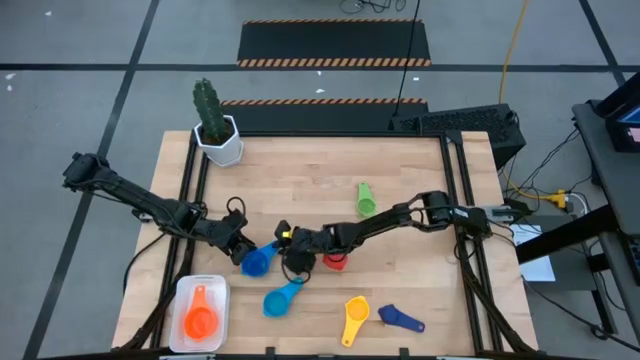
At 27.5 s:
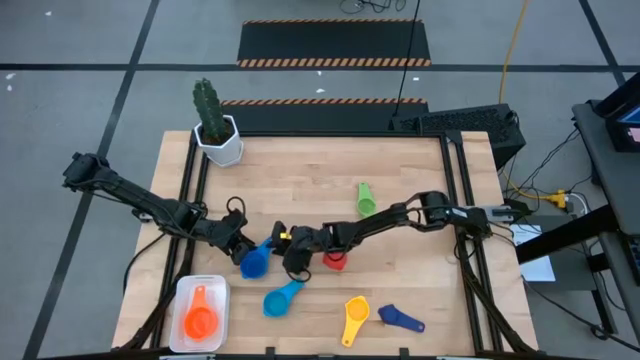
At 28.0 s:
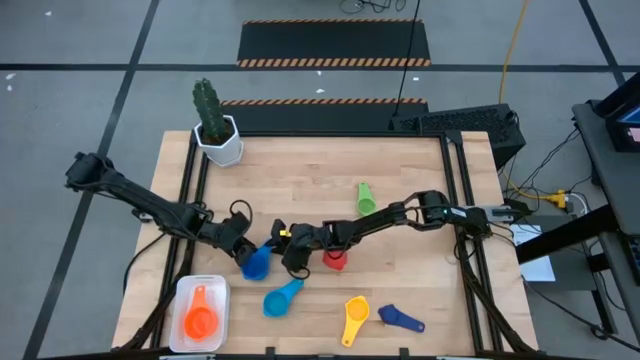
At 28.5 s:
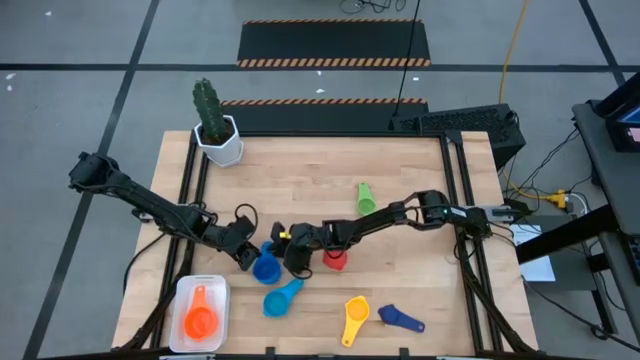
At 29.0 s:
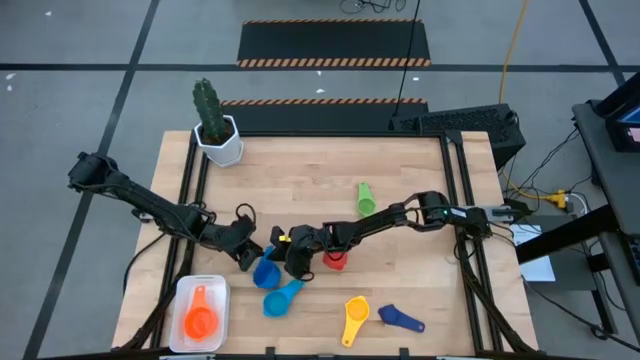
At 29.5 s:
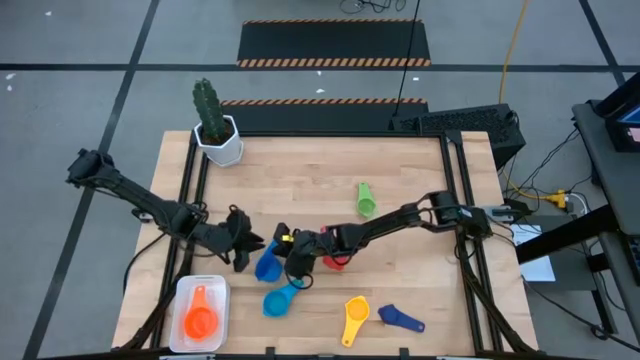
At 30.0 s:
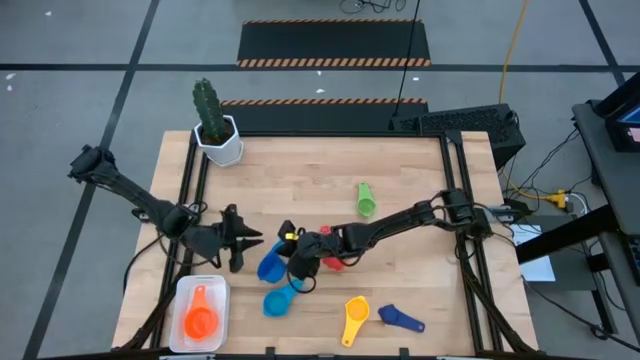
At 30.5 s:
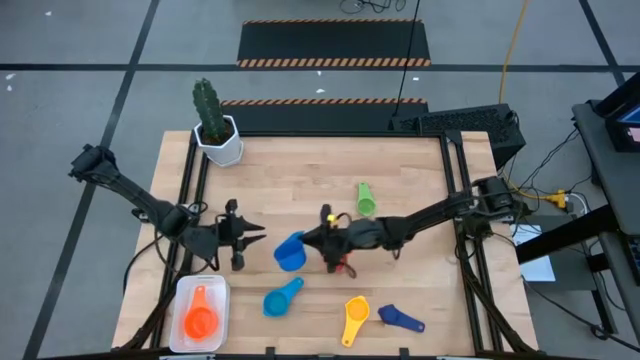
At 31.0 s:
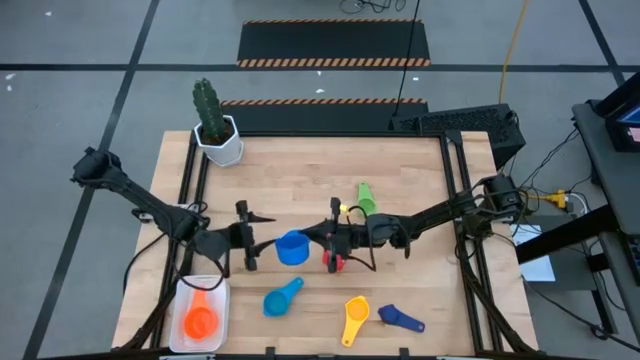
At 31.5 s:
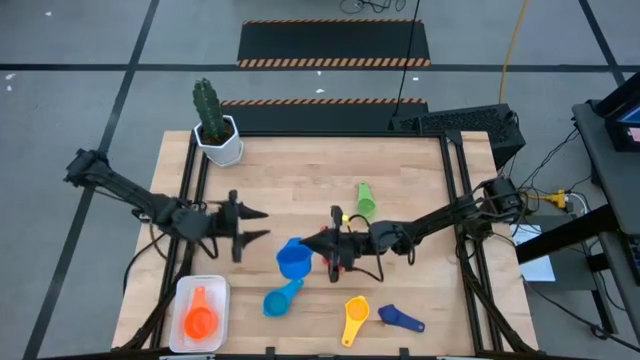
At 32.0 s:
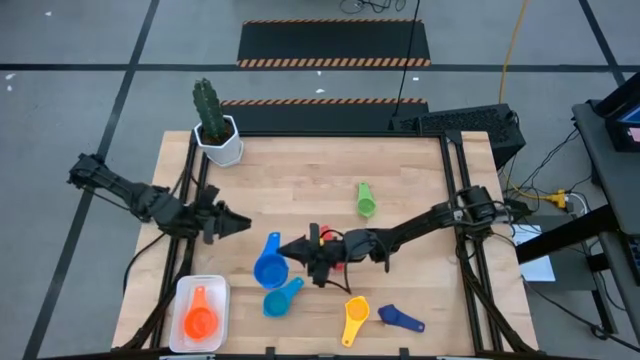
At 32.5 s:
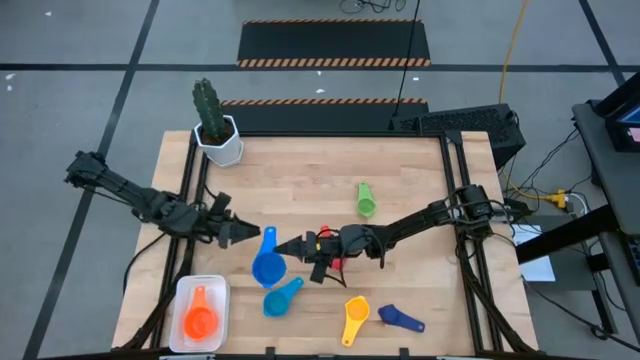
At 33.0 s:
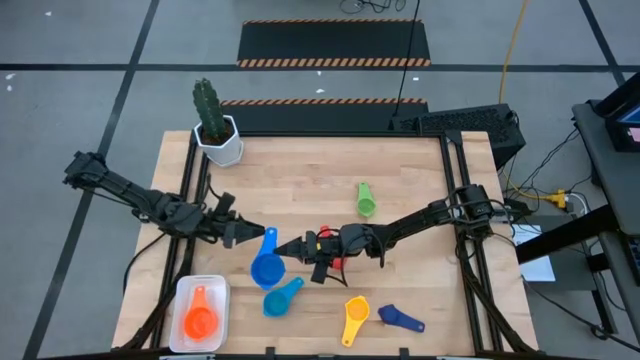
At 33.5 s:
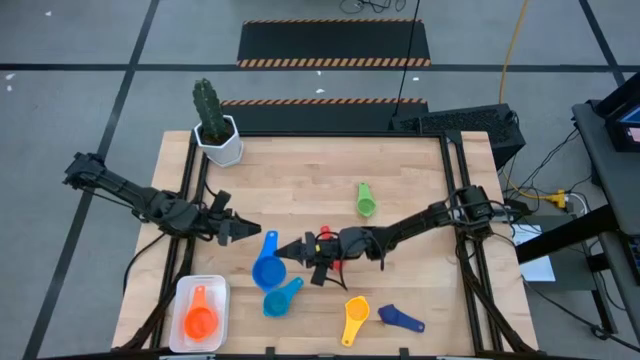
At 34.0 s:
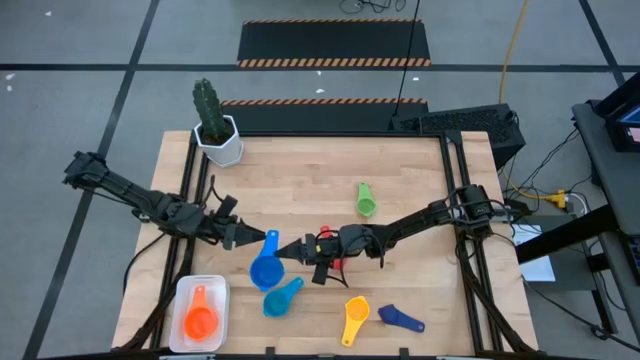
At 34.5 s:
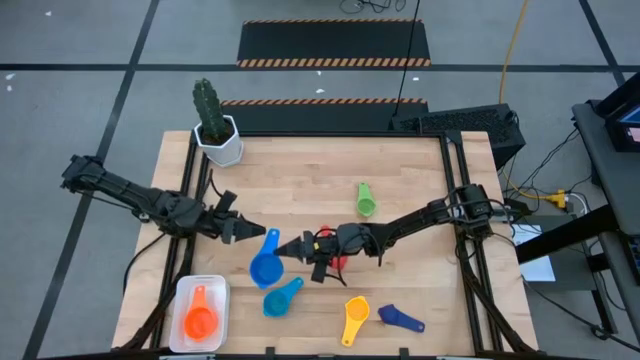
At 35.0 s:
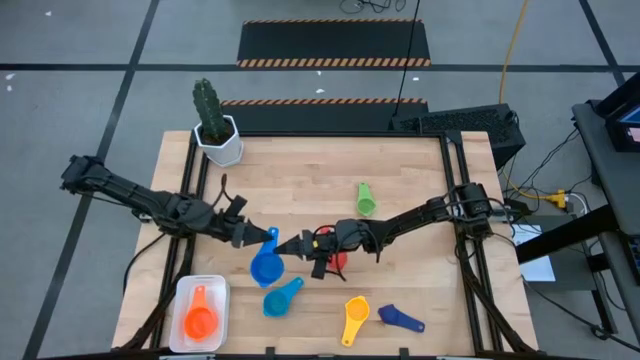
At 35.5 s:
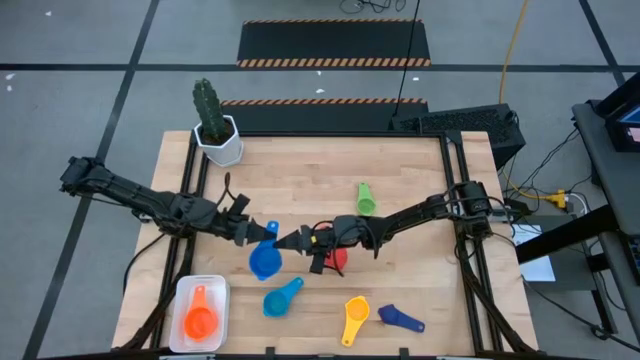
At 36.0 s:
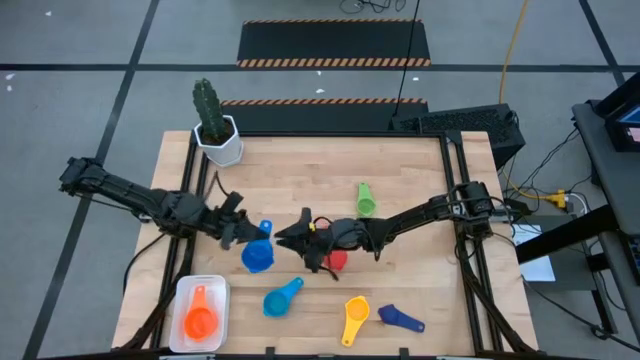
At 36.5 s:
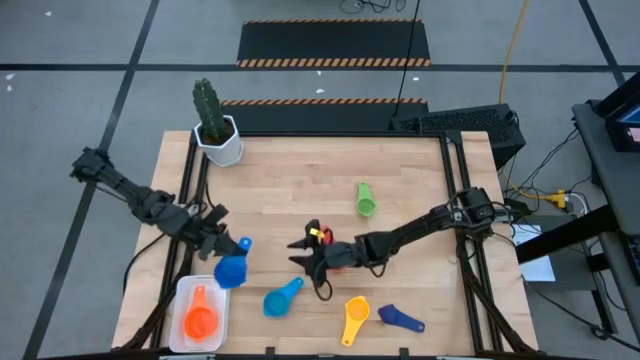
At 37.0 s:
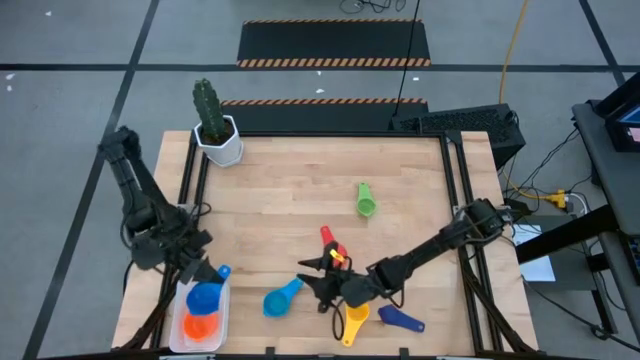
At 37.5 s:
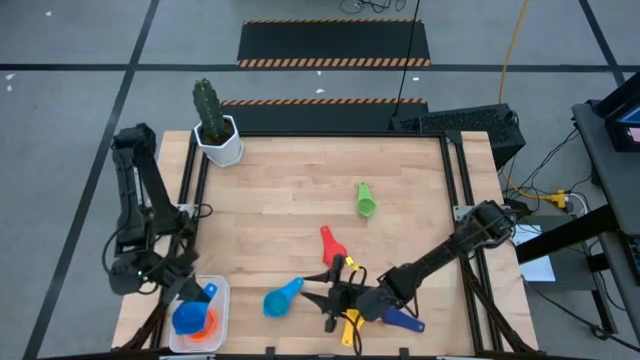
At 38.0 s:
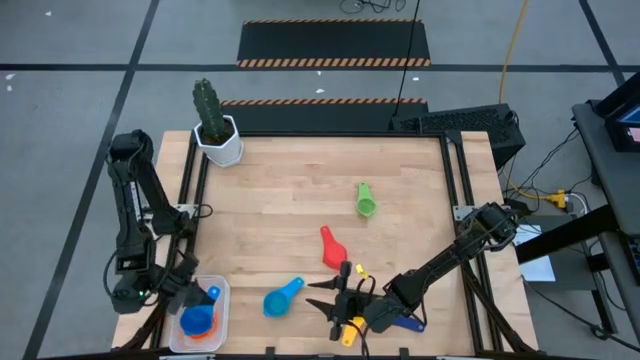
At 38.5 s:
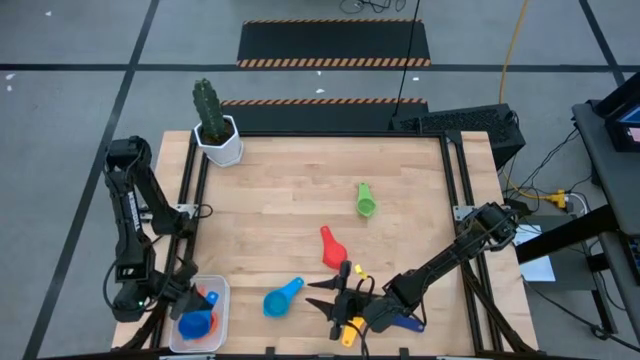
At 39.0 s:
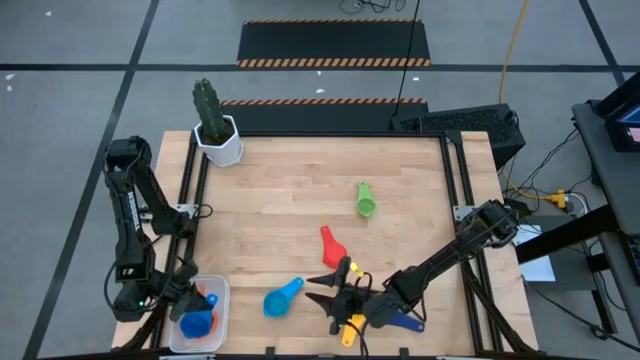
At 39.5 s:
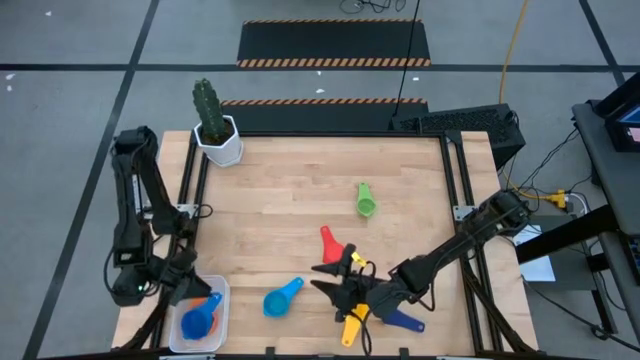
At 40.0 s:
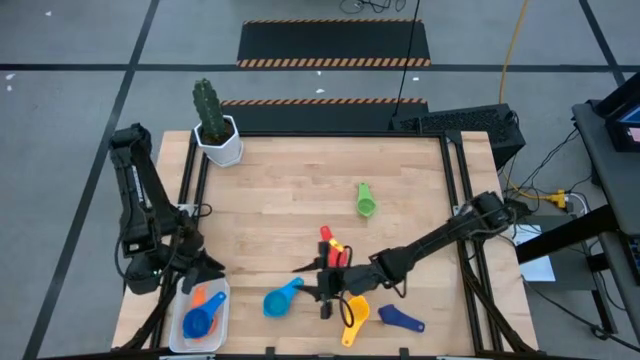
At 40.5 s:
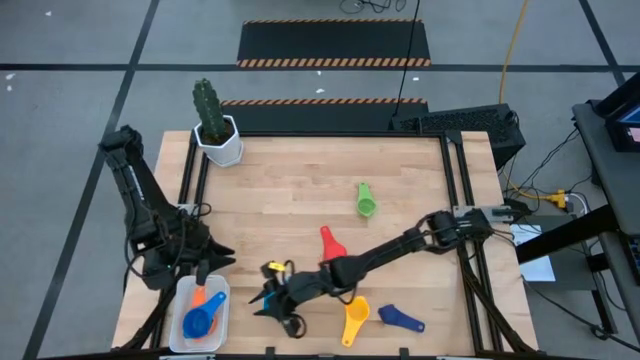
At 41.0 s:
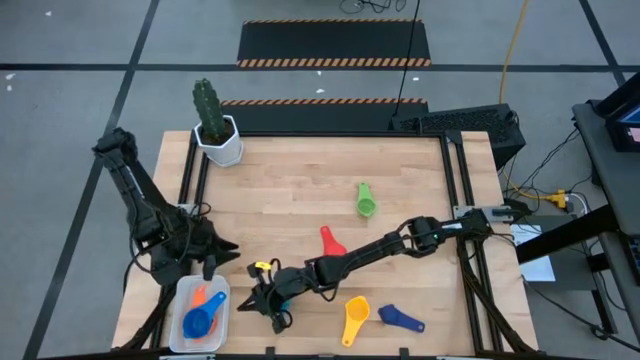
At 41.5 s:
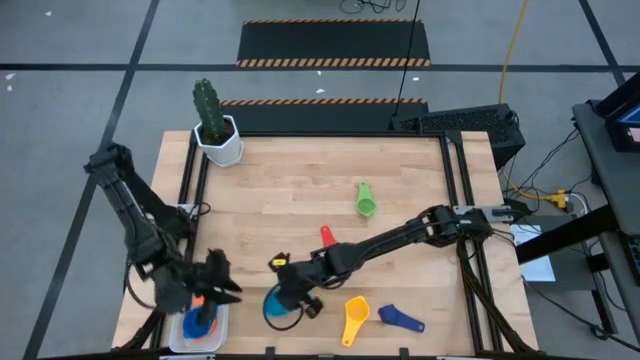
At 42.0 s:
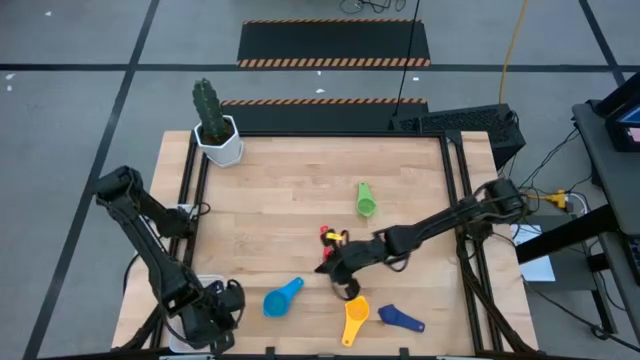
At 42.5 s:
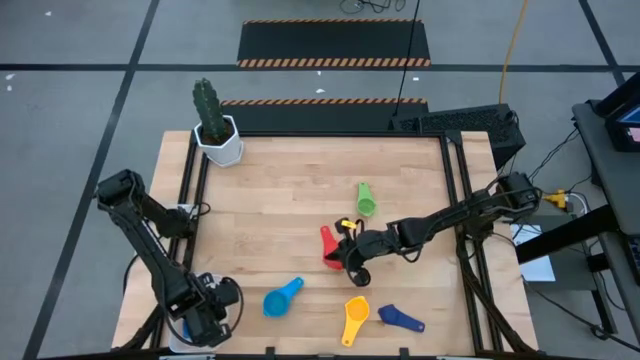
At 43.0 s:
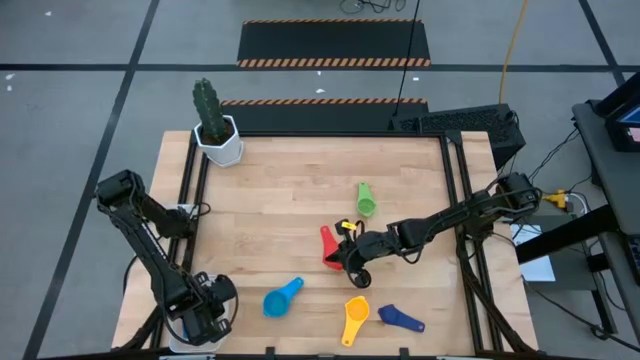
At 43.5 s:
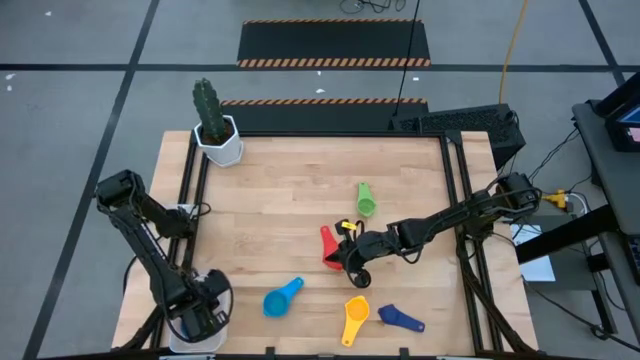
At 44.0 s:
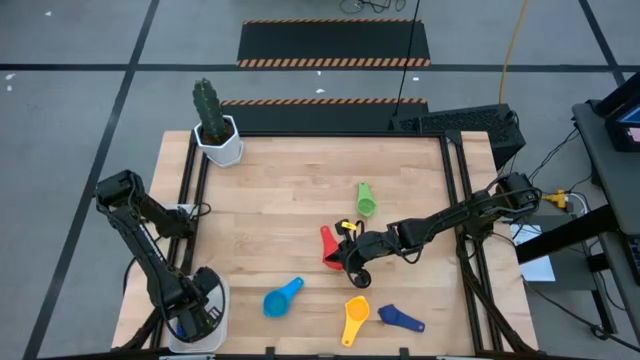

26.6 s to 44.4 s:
Task: Nest measuring cups in basket
Stack the blue measuring cup on top of the orange measuring cup into the white bin
